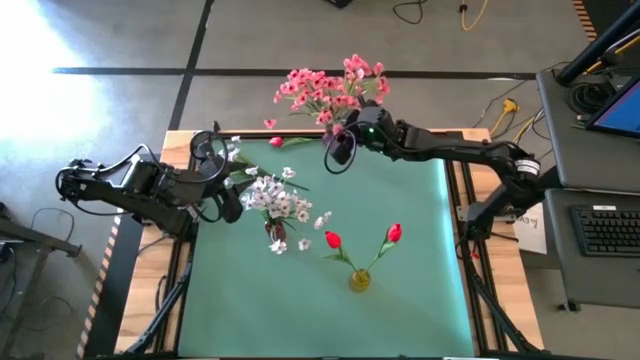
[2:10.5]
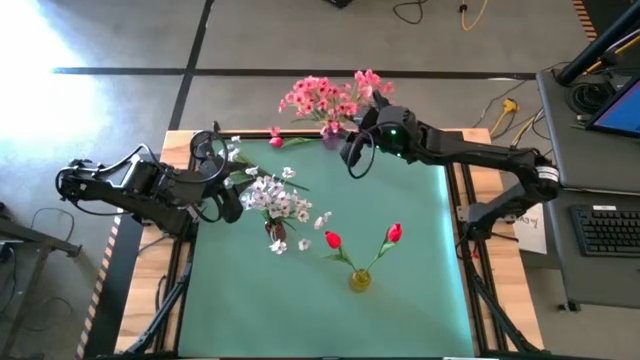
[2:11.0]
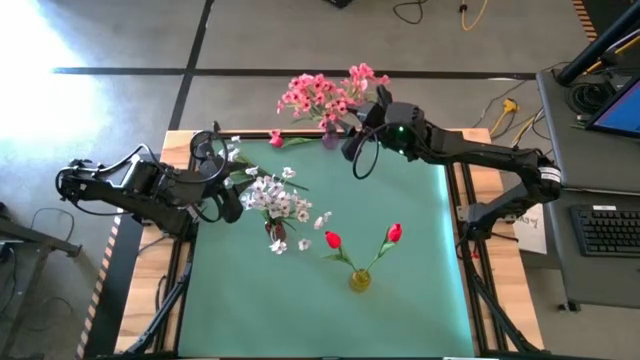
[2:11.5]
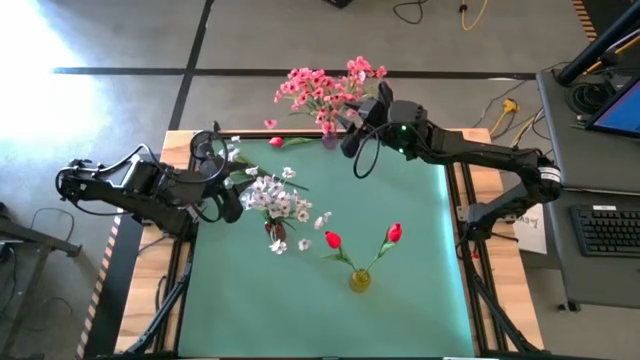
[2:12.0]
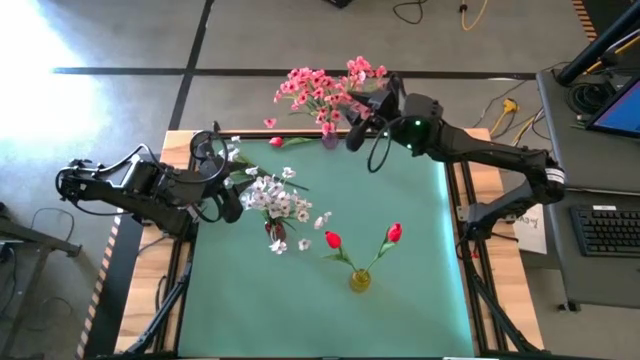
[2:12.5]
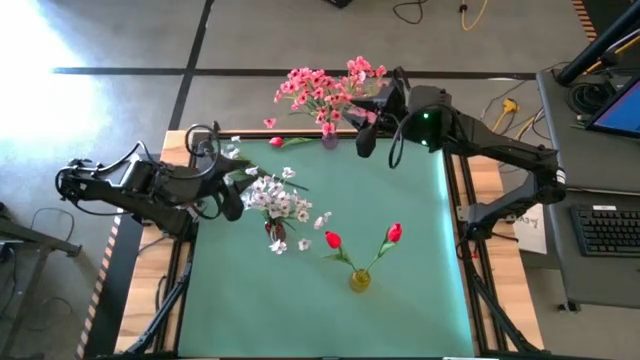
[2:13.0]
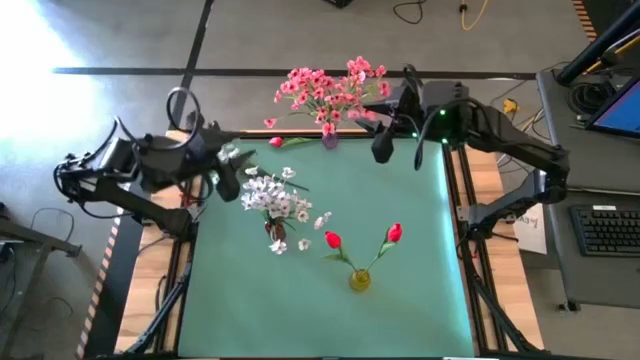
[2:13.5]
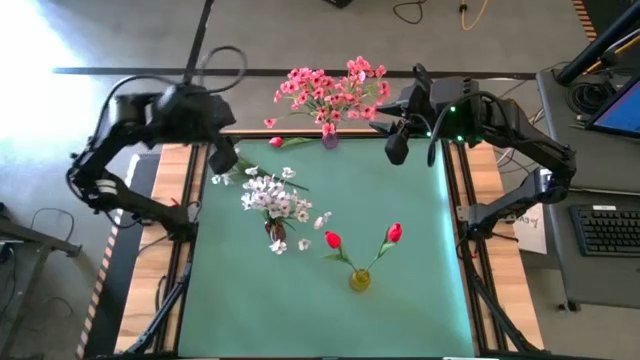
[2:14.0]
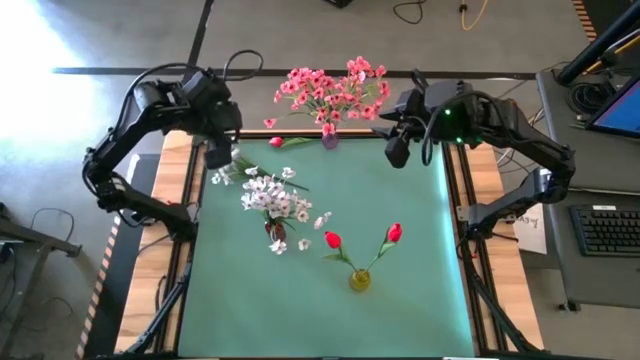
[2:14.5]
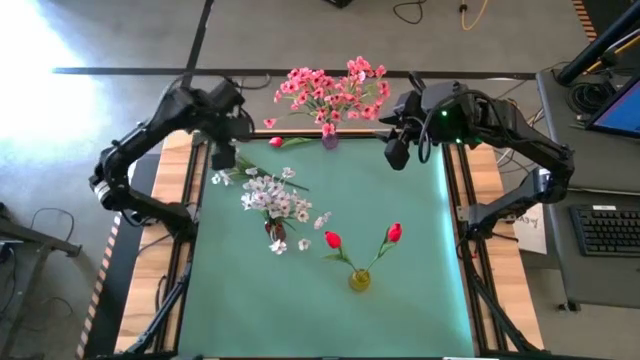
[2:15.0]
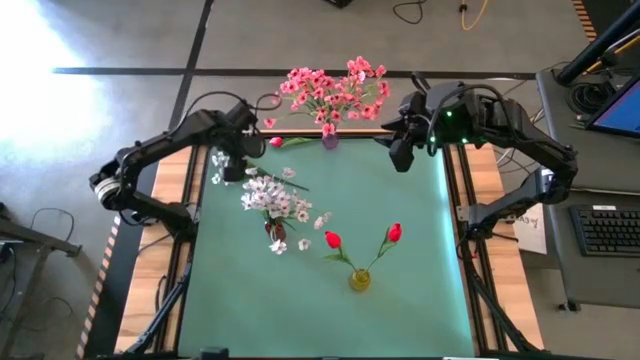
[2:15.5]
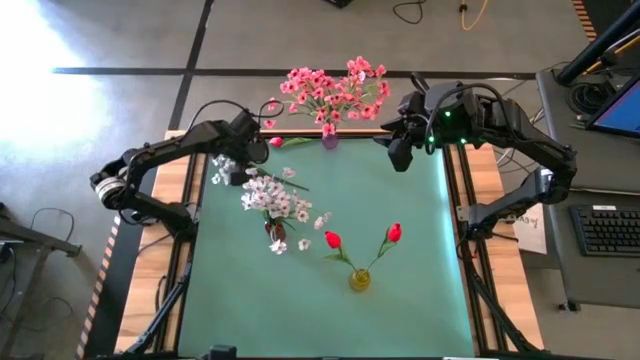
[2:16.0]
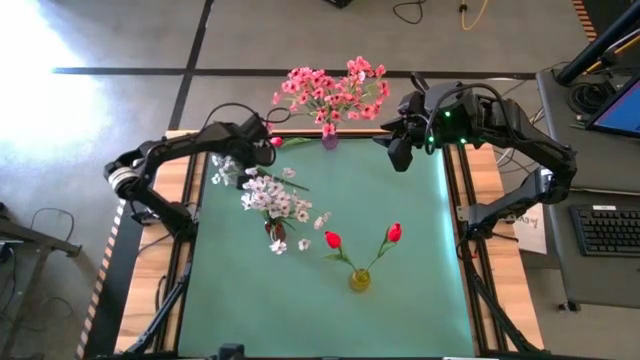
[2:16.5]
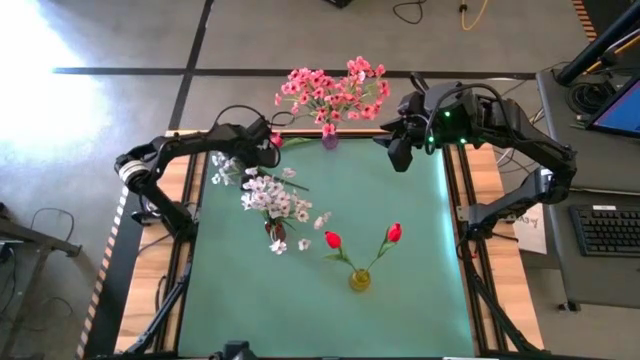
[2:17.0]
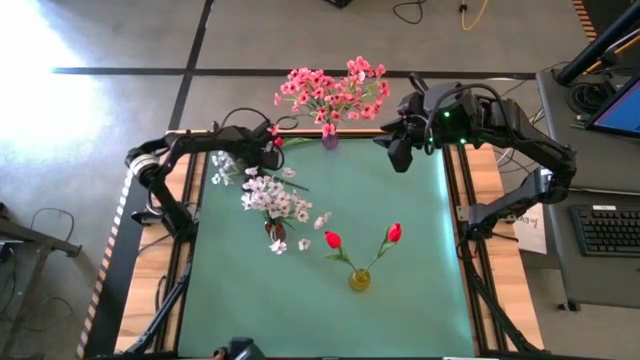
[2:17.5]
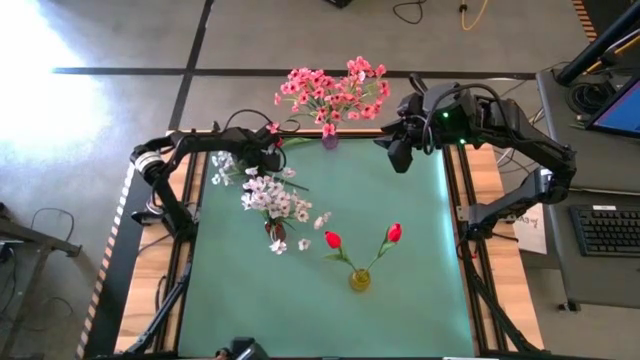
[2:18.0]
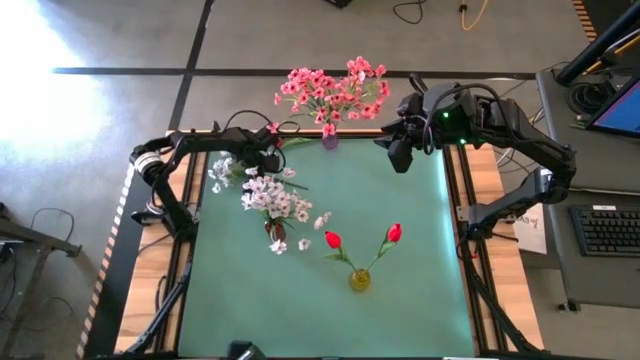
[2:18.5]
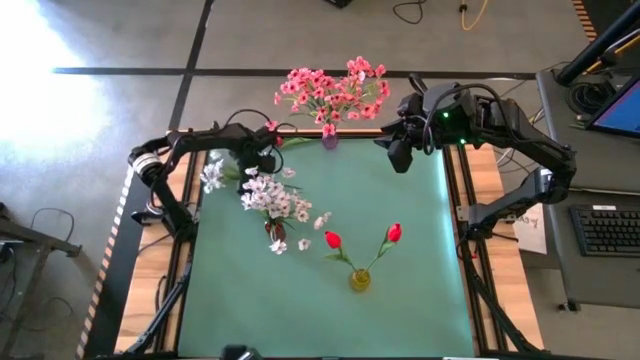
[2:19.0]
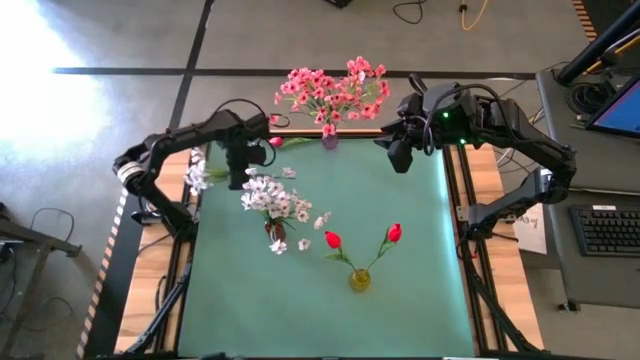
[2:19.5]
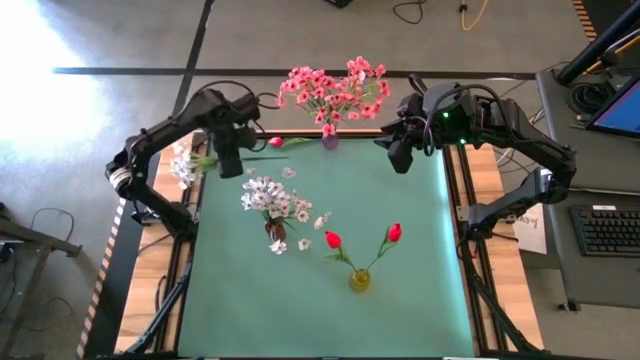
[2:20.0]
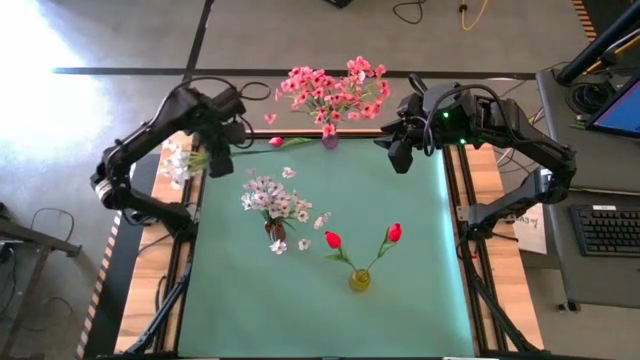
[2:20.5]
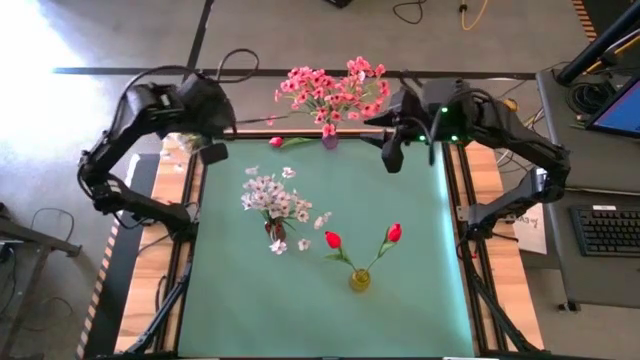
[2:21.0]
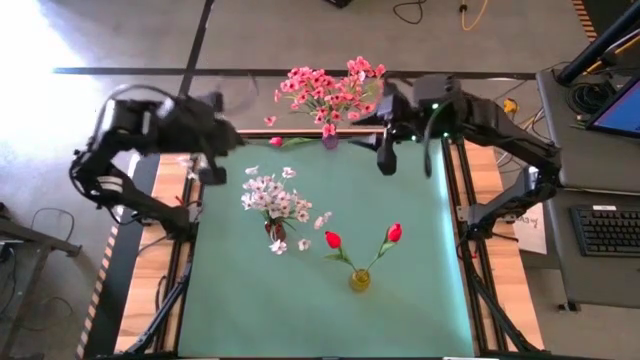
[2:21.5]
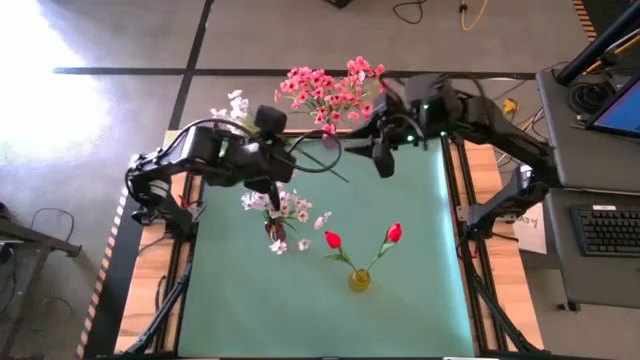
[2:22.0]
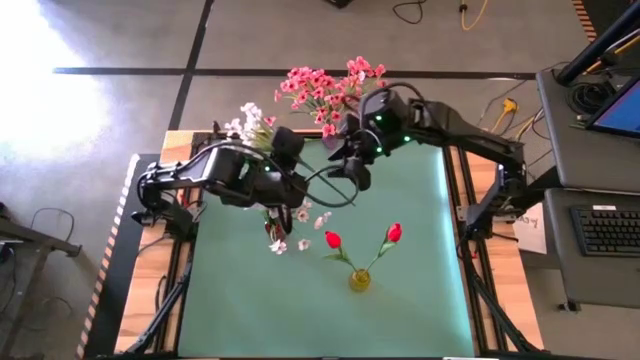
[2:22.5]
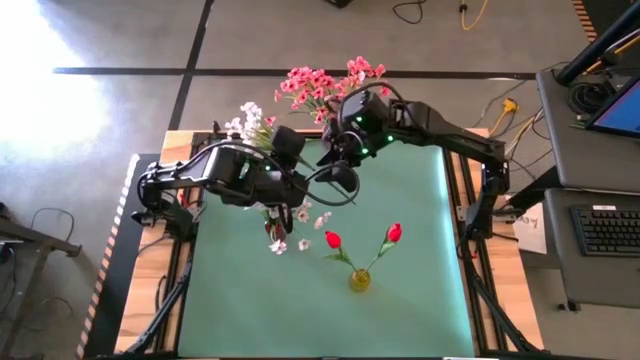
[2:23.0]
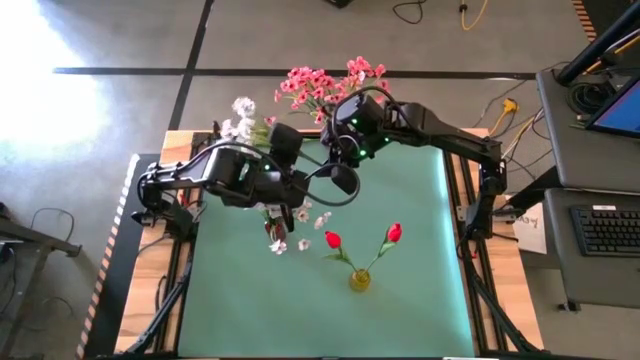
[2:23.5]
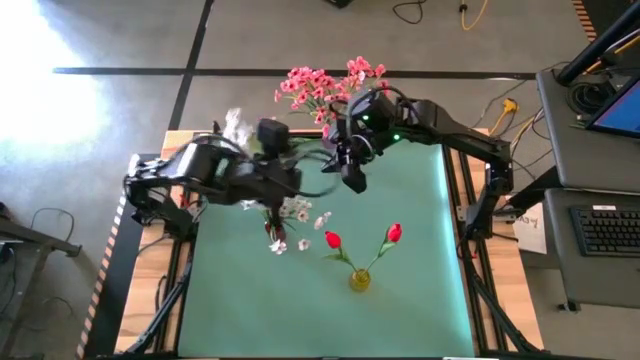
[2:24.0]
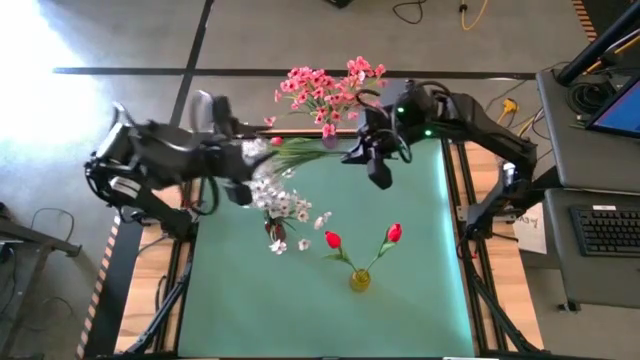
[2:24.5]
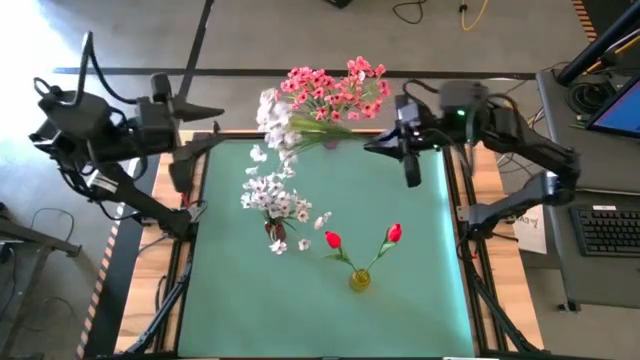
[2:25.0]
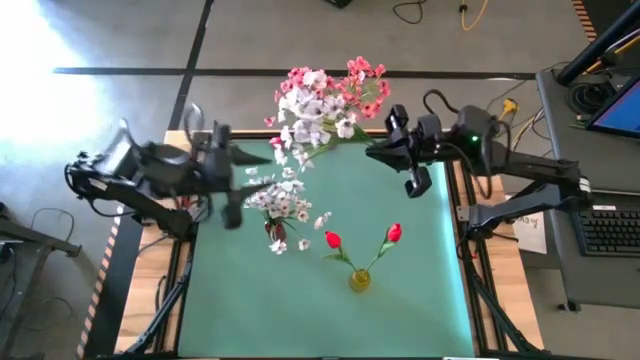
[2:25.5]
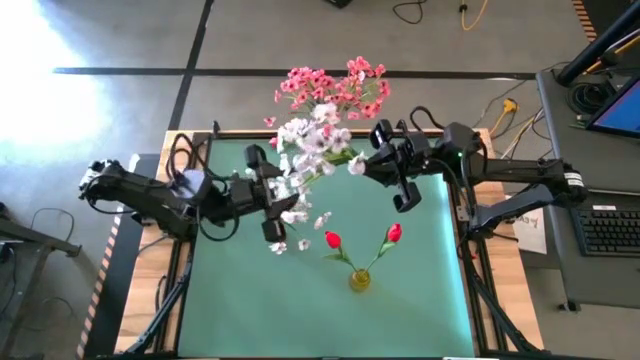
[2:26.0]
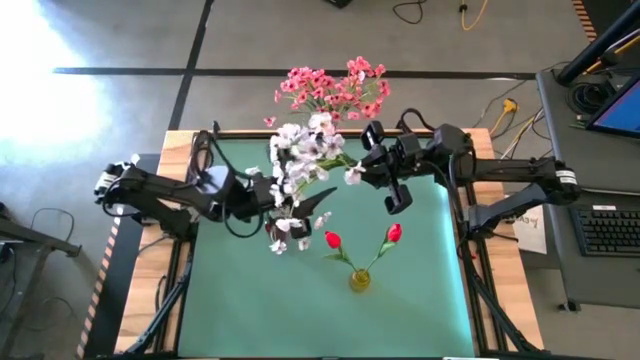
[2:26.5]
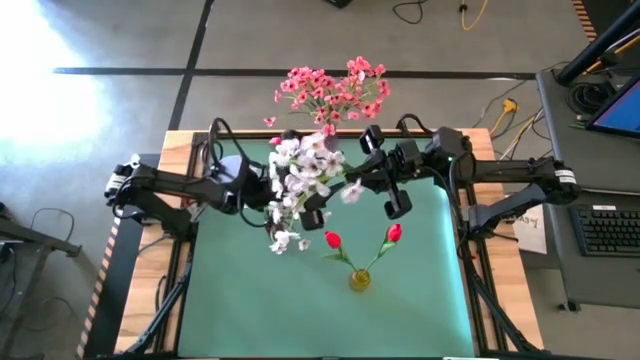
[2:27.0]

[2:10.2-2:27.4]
Task: Sort flowers into vase by color
Put the white flower into the red flower vase

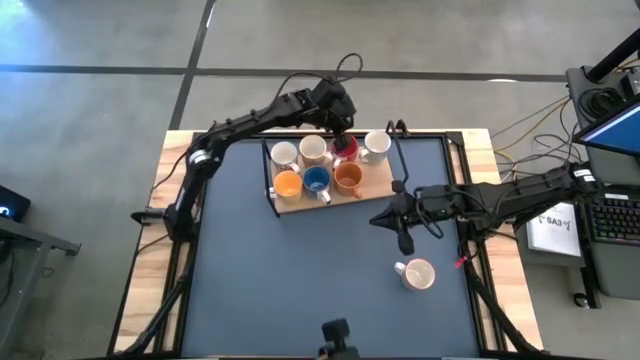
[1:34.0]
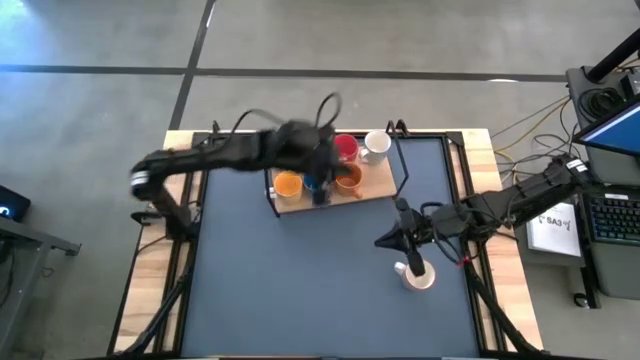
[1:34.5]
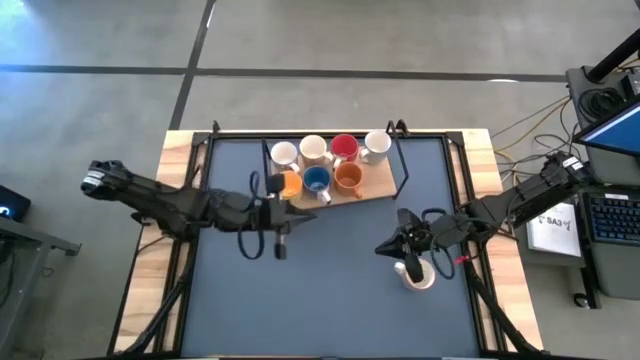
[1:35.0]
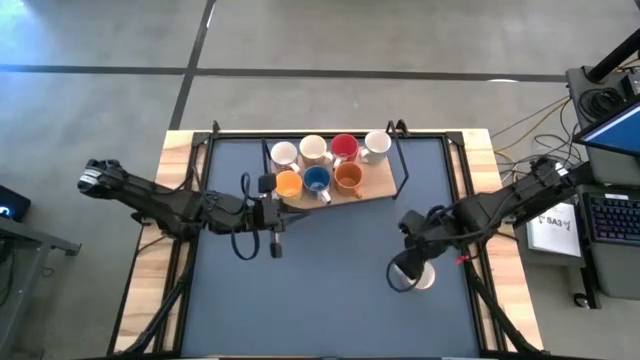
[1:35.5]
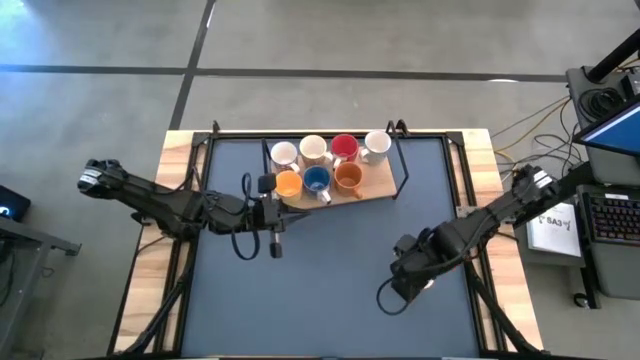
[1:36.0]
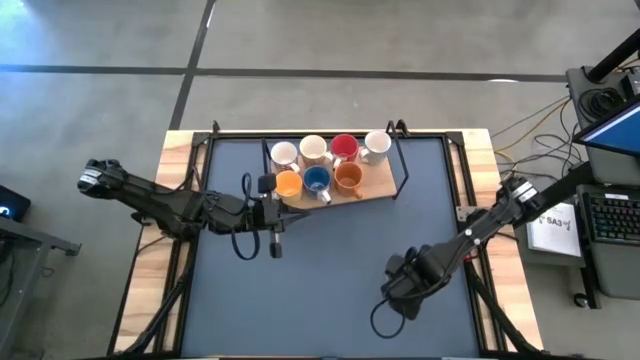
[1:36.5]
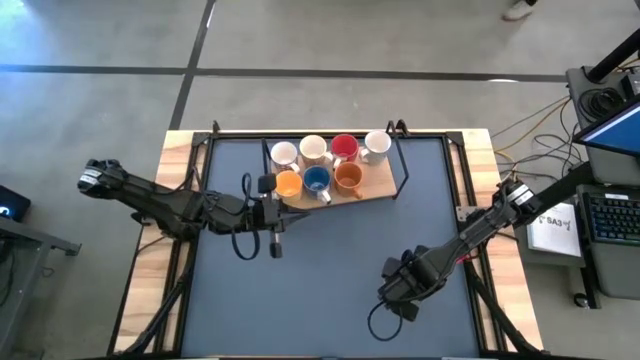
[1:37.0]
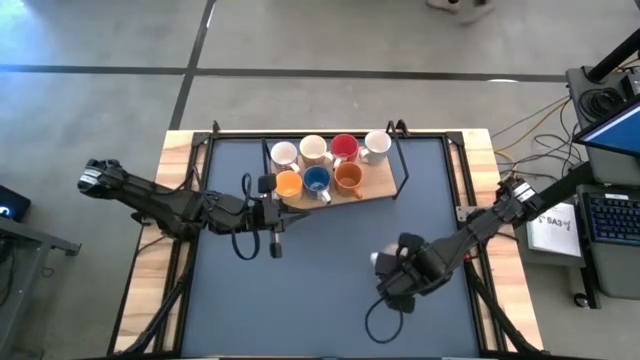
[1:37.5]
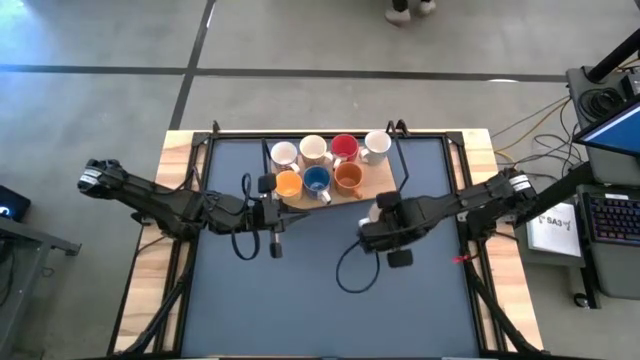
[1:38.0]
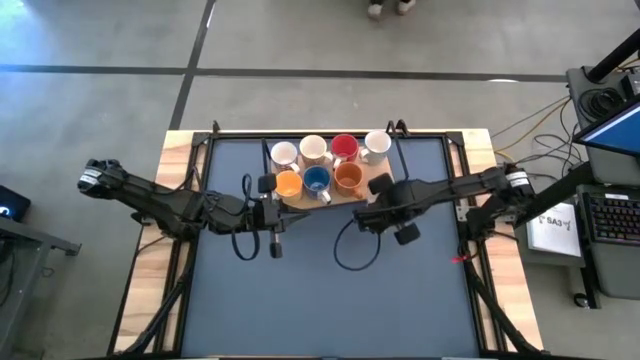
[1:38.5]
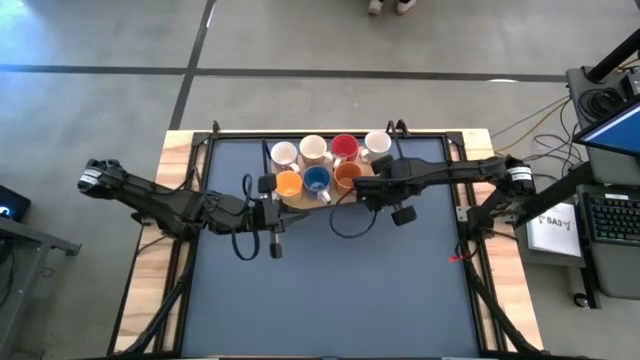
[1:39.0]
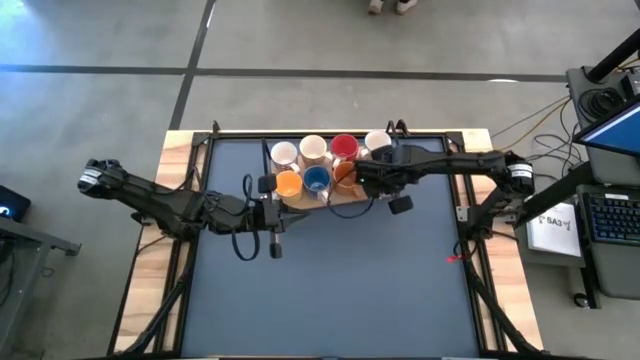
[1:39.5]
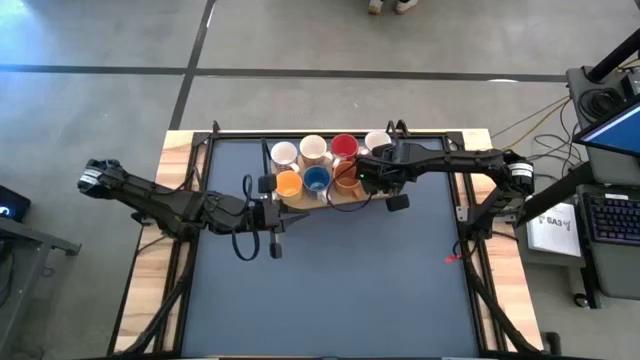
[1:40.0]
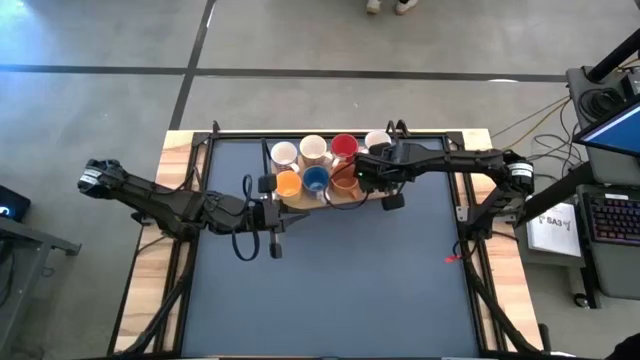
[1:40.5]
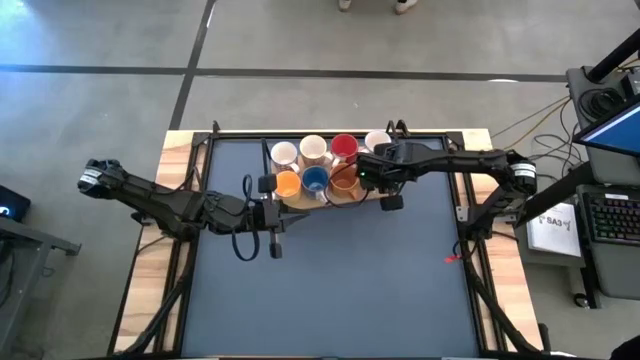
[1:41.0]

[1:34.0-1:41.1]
Task: Place coffee mugs
Put the gray patterned mug on the shelf
